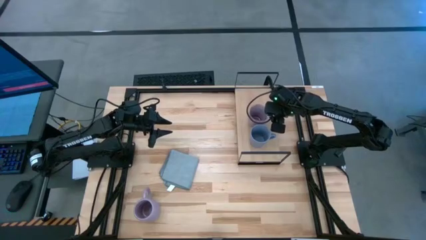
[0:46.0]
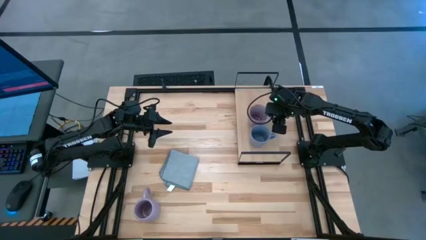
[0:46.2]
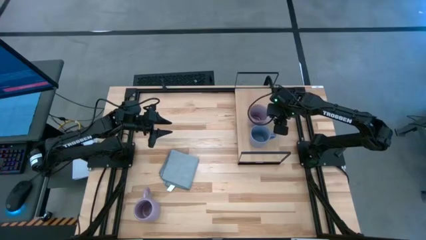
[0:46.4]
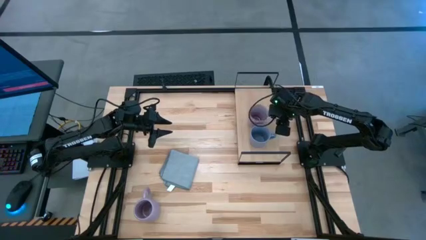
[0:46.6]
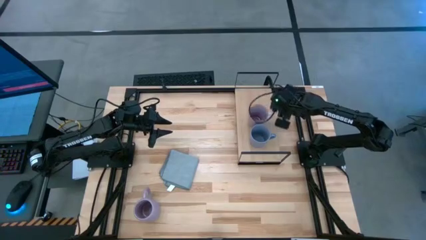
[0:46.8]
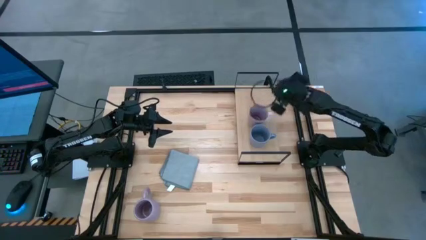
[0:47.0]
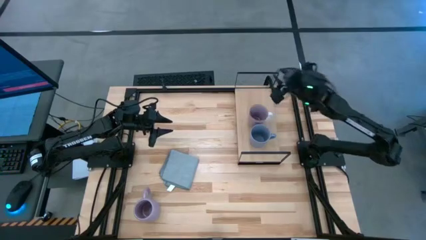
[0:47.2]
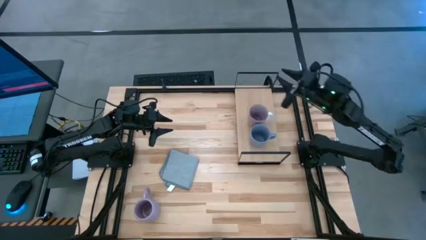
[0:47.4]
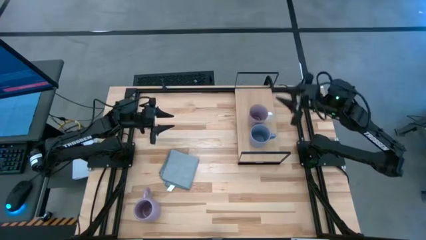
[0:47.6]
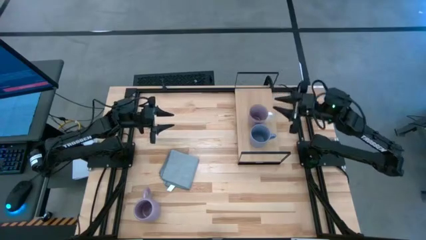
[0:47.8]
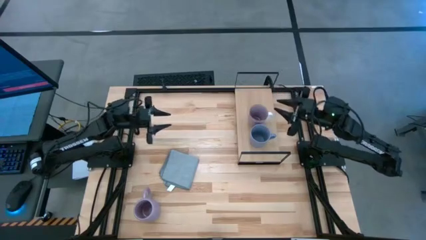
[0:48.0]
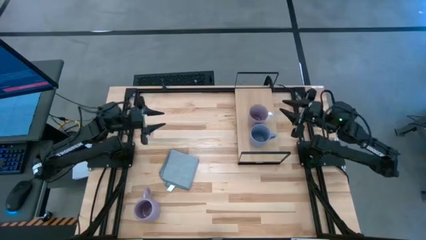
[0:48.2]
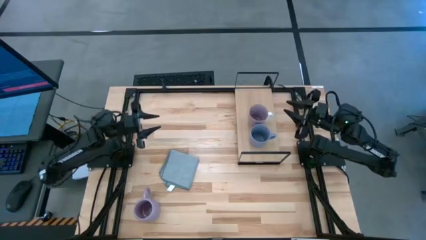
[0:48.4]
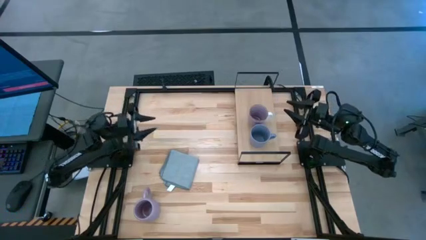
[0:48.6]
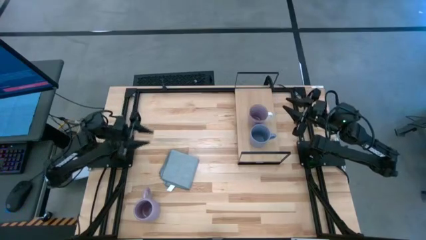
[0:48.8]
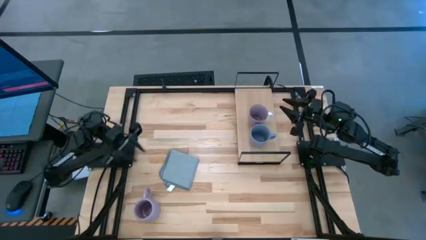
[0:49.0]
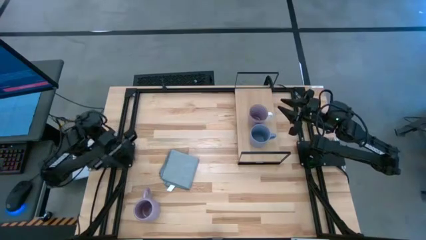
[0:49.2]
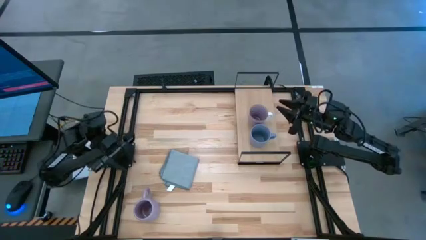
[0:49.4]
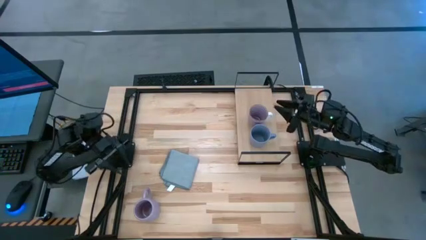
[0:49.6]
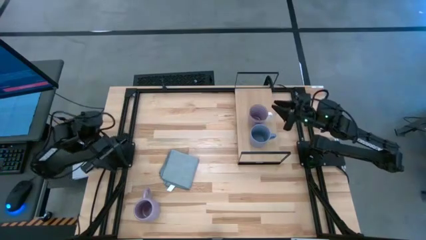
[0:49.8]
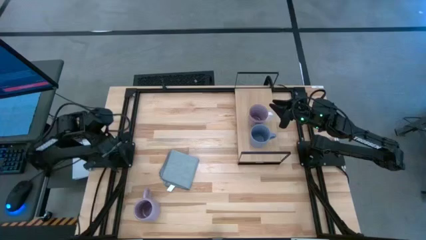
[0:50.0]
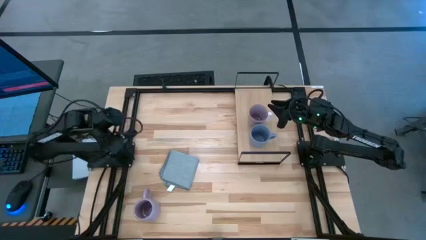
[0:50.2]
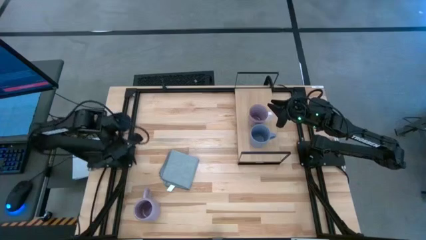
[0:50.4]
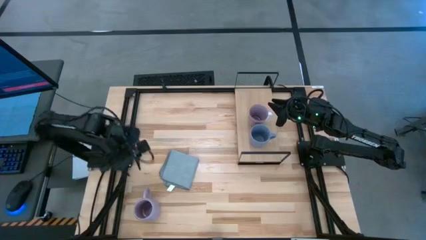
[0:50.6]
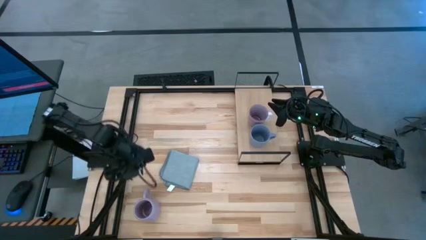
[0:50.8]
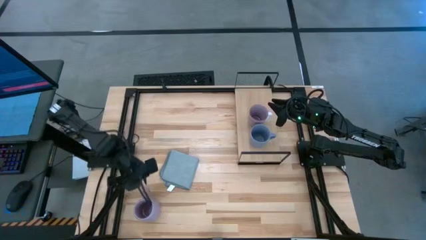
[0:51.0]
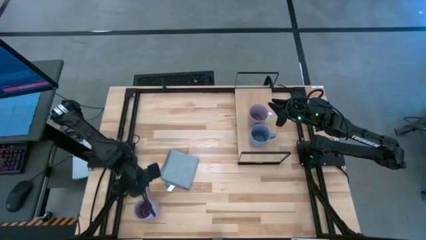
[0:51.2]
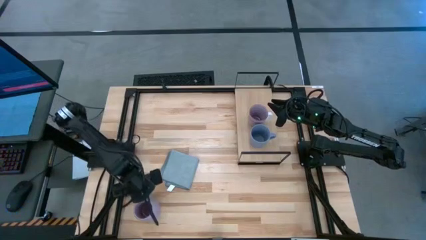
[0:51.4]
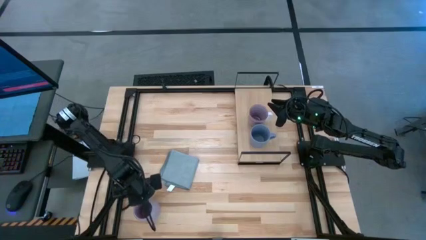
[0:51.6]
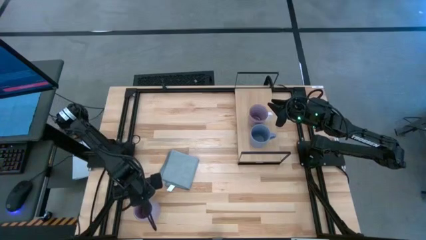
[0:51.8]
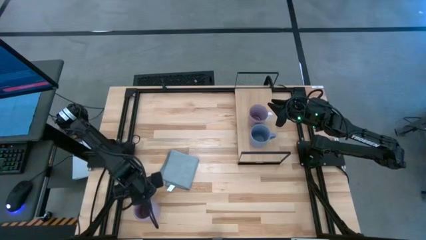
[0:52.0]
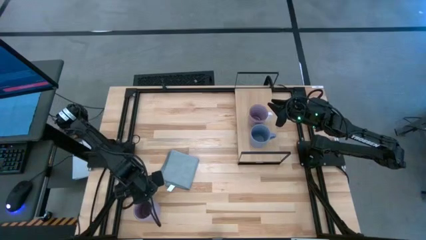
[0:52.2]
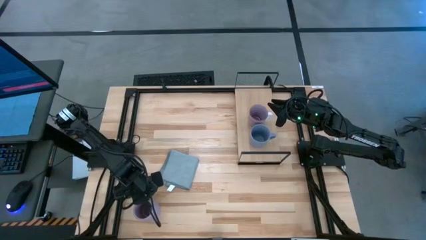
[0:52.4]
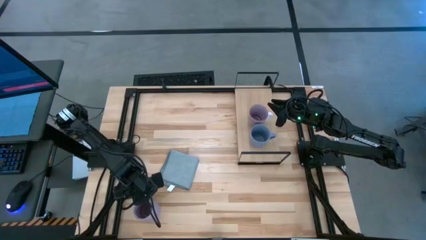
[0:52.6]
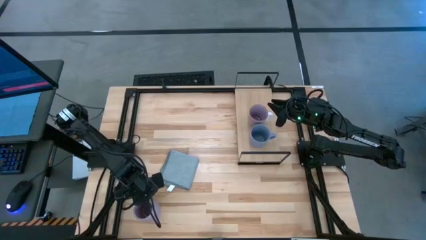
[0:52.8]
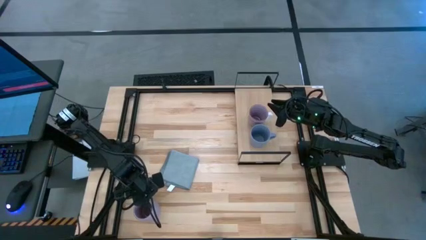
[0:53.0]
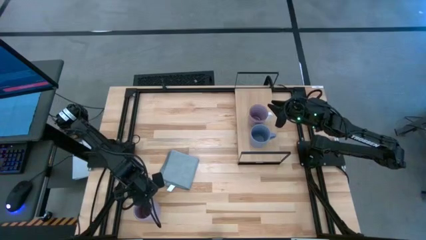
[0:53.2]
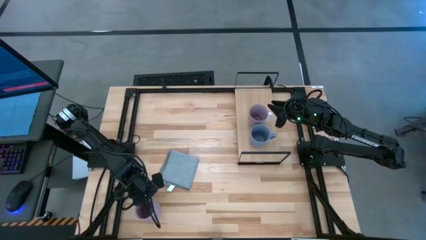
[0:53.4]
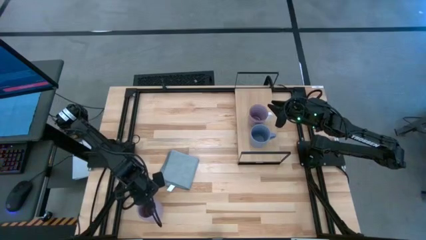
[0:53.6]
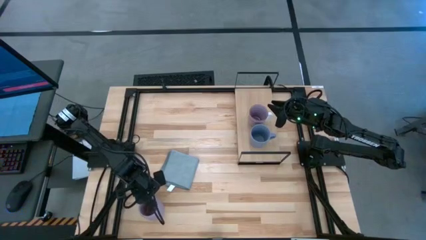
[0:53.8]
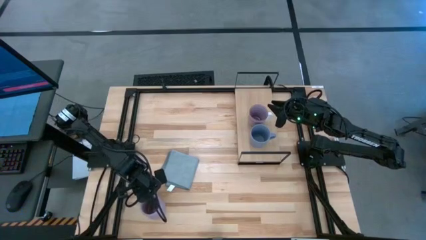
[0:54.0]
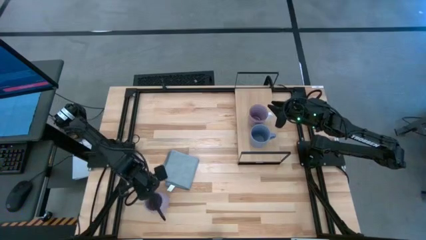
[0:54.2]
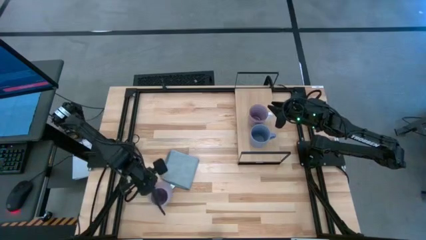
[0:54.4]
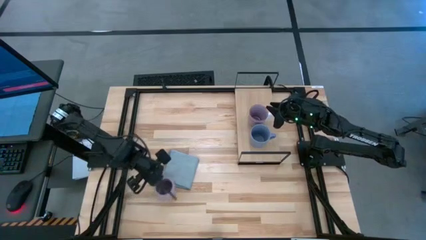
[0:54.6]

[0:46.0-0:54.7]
Task: Stack small to large cups/mugs on shelf
Put the purple mug on the shelf

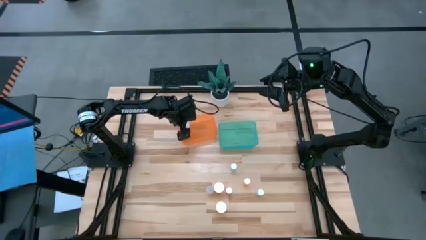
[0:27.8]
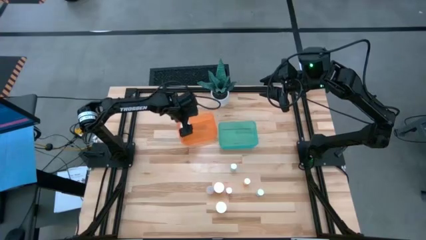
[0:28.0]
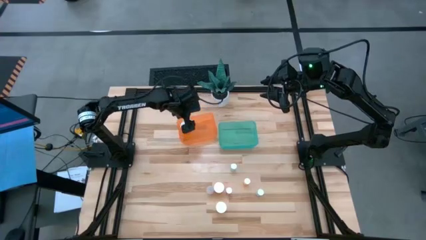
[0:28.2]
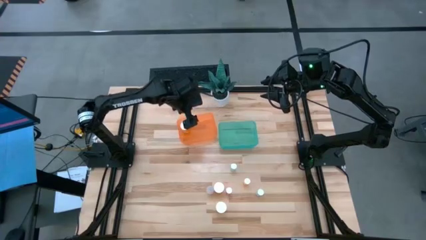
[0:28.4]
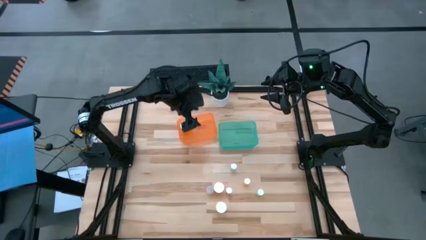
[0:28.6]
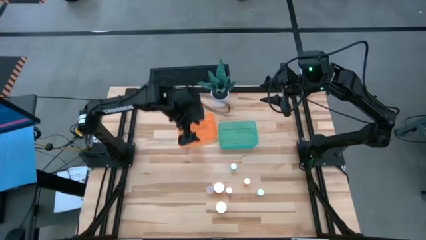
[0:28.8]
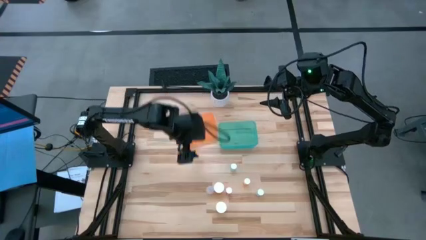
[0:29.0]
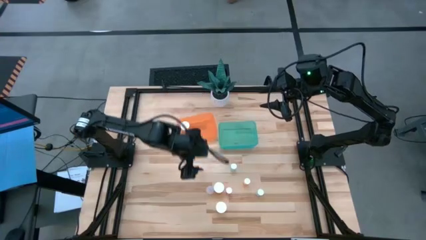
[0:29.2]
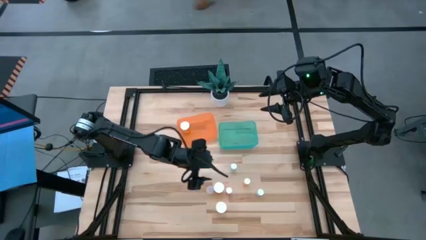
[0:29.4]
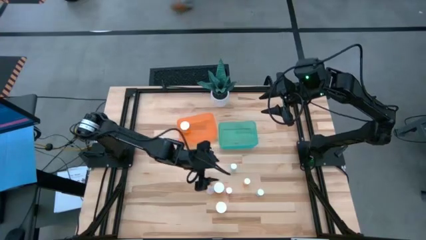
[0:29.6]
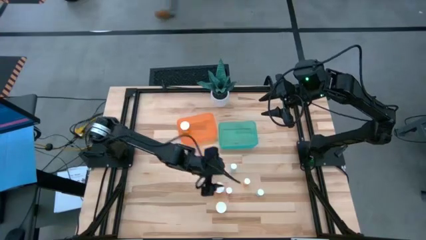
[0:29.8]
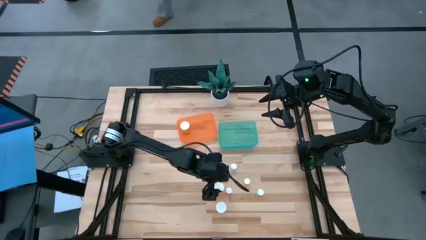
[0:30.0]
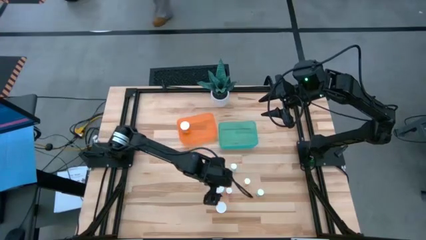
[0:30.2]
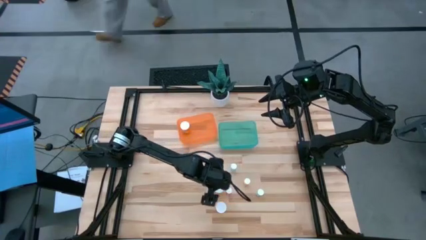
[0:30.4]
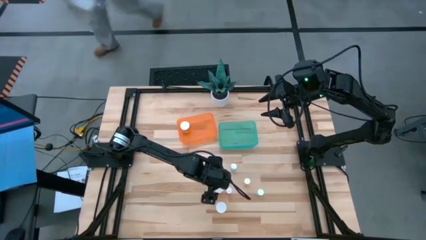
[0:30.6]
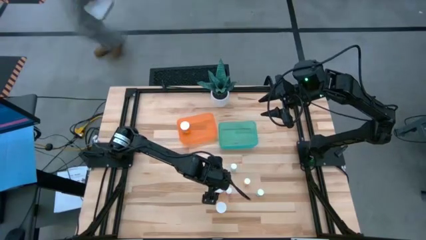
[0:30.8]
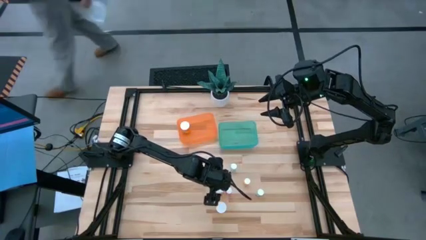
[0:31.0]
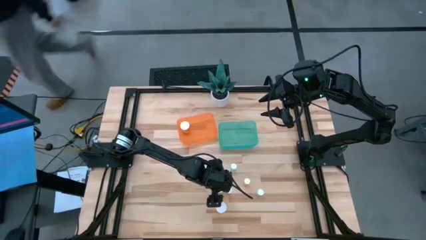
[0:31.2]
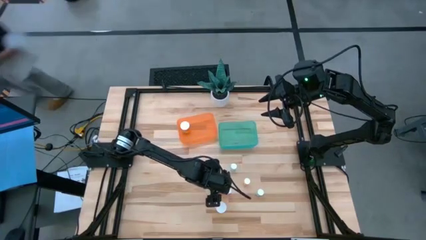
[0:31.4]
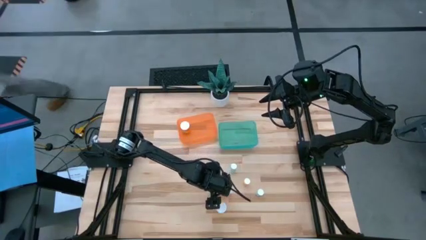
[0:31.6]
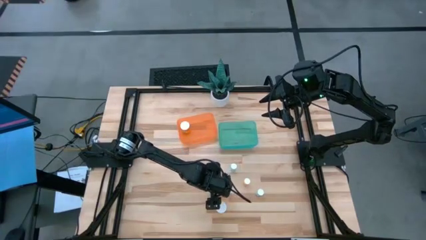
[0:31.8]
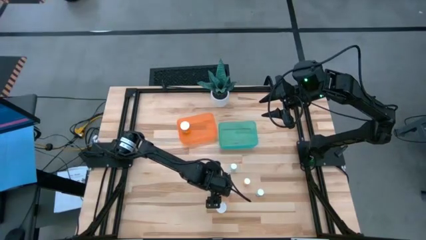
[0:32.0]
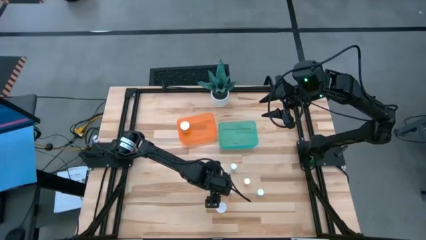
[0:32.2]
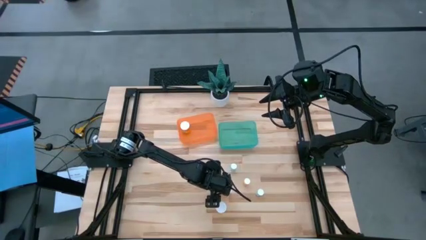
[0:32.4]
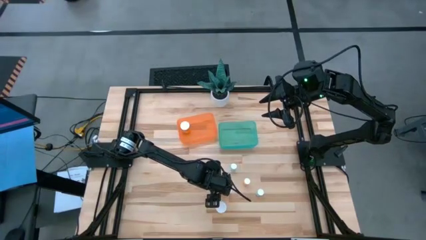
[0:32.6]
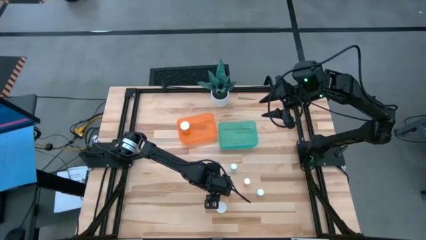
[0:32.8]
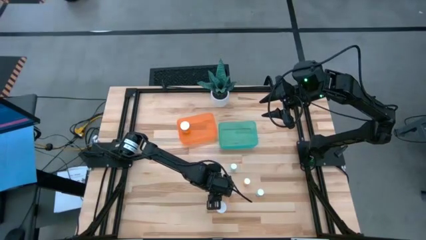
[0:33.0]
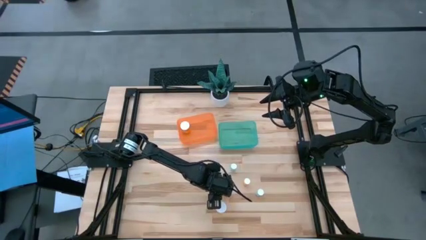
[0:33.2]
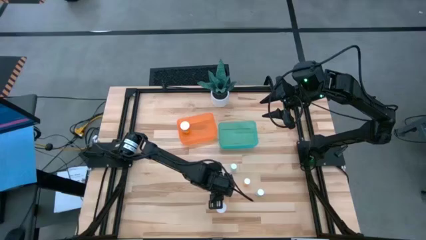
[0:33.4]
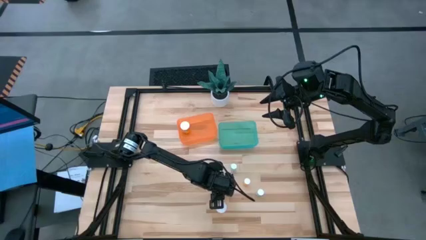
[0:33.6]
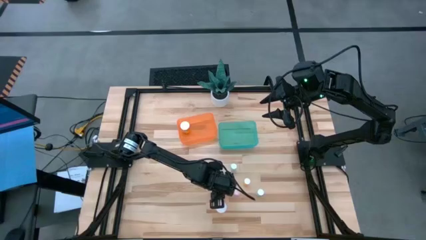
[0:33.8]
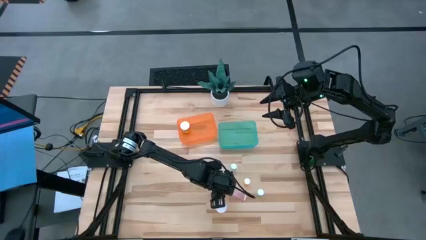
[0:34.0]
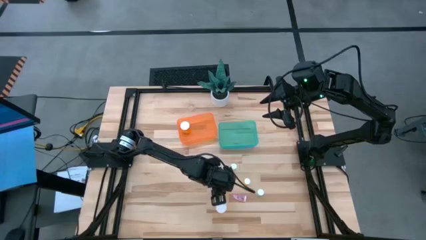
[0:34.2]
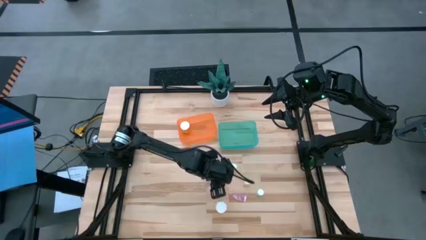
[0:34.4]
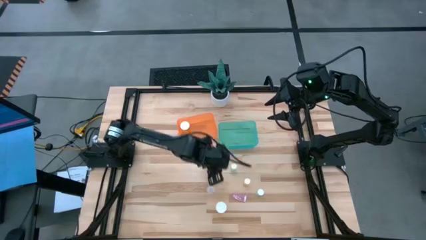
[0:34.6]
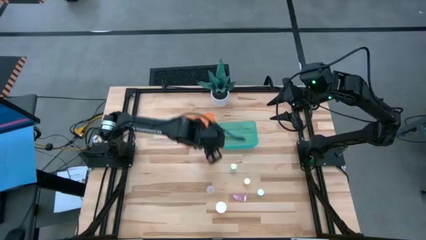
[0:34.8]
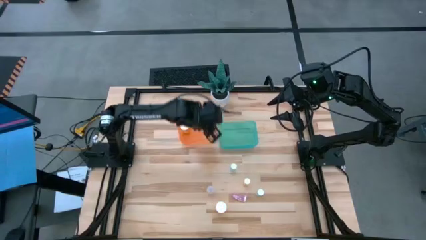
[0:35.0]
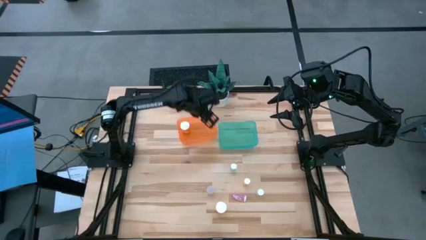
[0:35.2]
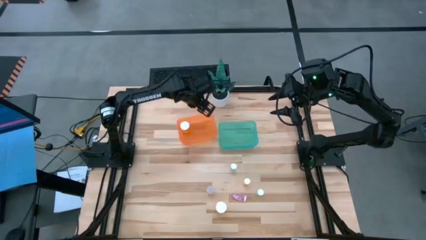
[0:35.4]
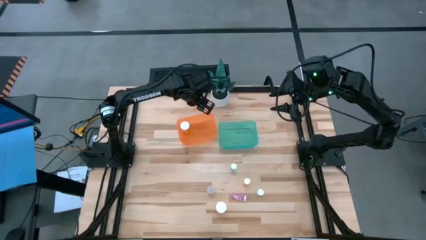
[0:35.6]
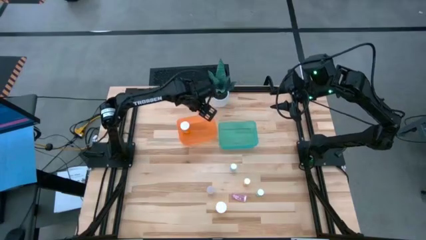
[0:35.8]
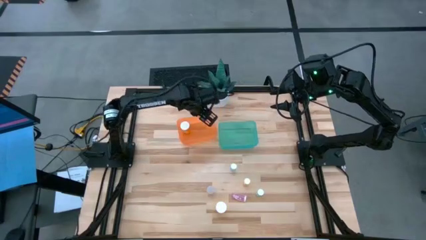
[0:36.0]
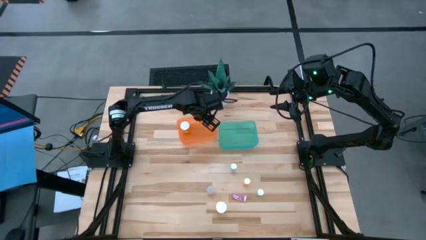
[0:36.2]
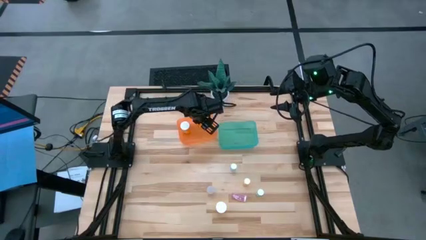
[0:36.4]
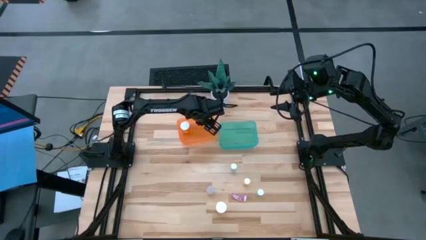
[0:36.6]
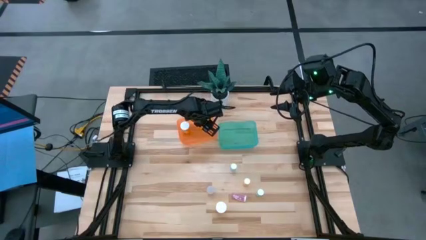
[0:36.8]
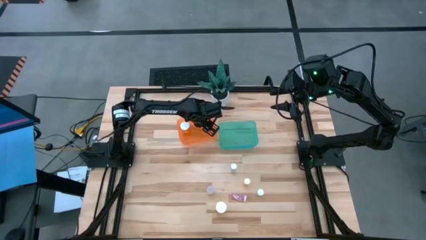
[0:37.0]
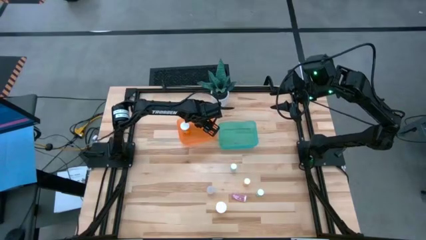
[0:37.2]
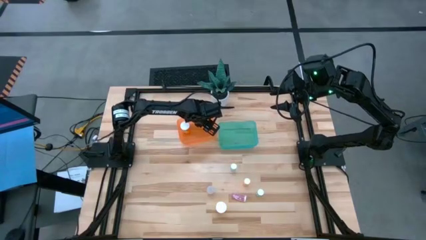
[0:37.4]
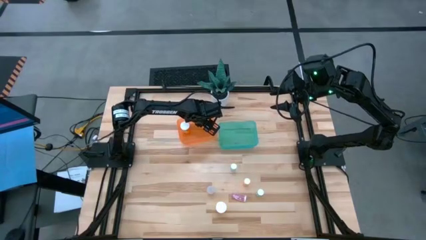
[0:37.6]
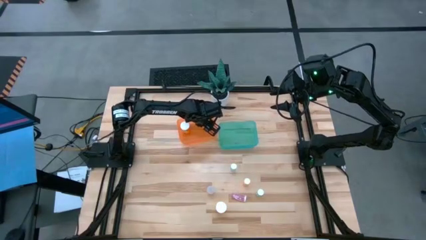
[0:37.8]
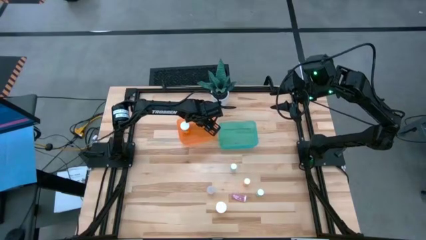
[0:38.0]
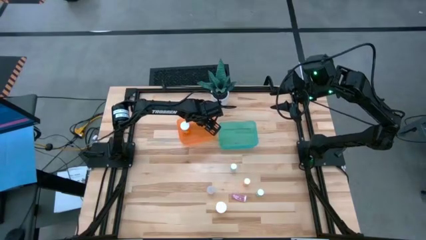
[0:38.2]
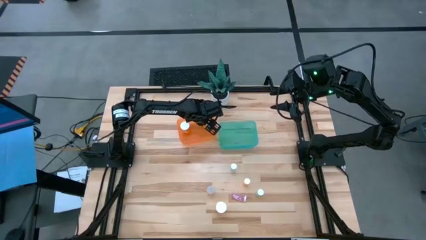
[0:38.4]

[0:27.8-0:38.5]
Task: Pick and place medicine bottles into bin by pill shape (circle, oval)
Put the top orange capsule bottle into the orange bin
